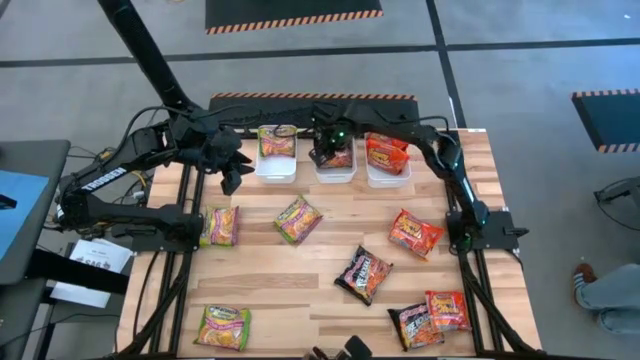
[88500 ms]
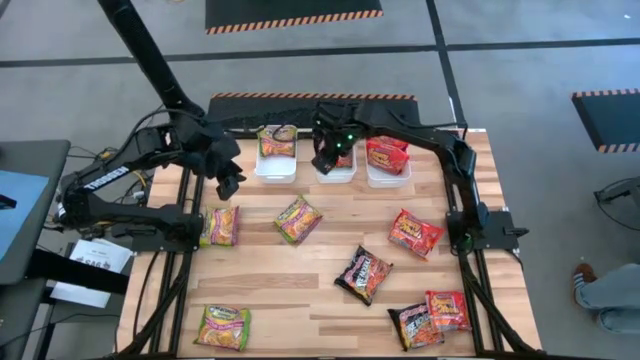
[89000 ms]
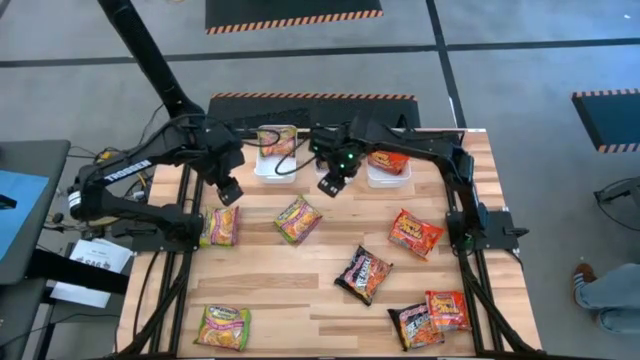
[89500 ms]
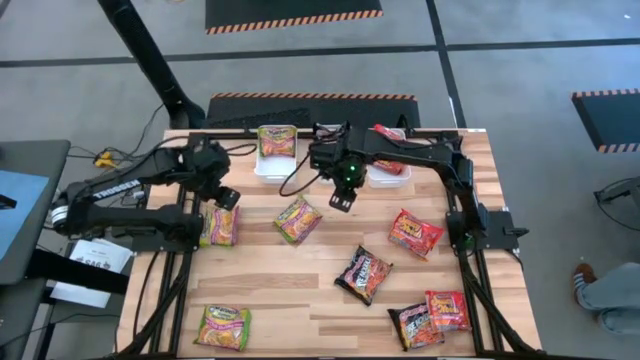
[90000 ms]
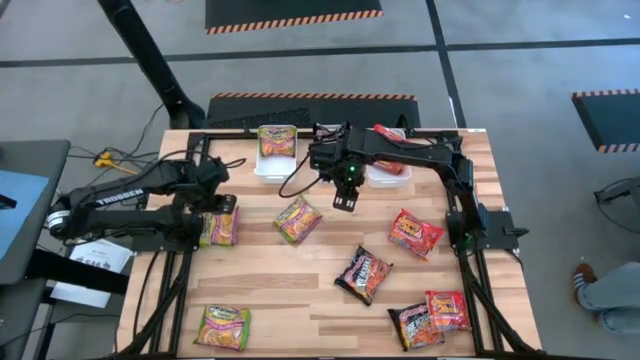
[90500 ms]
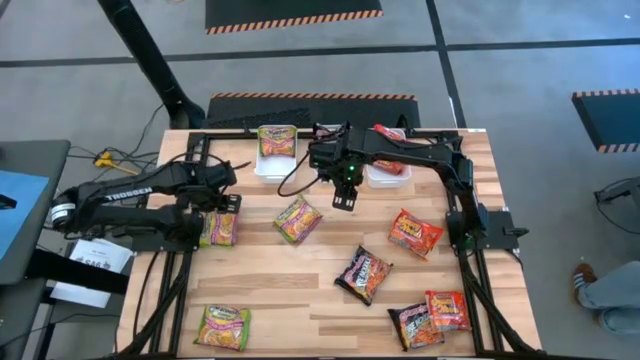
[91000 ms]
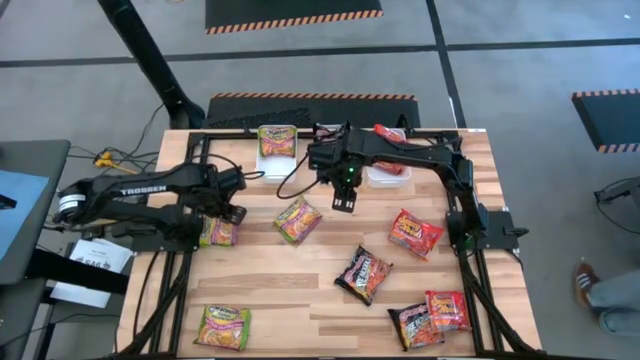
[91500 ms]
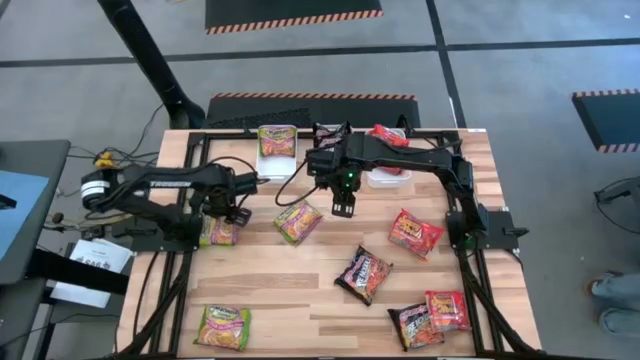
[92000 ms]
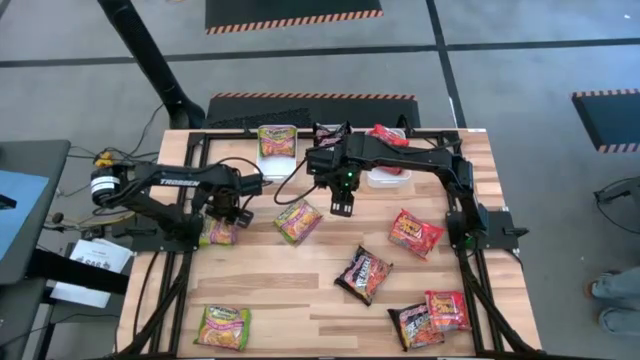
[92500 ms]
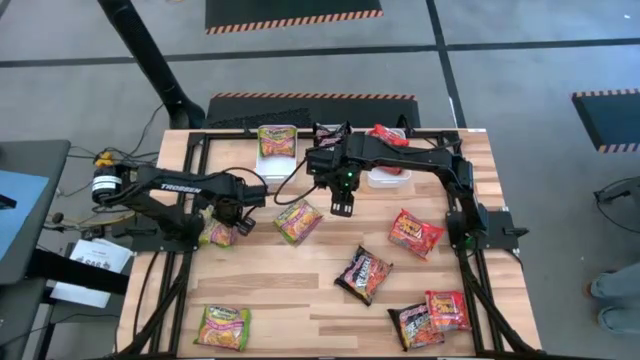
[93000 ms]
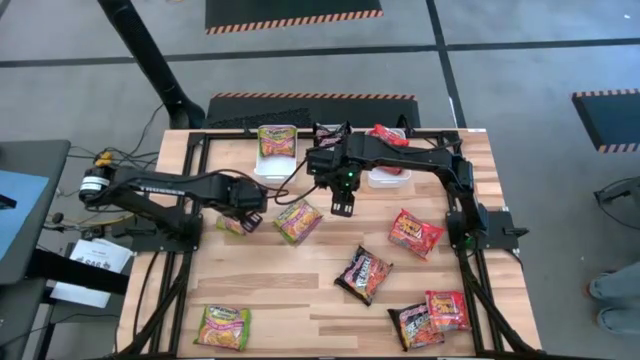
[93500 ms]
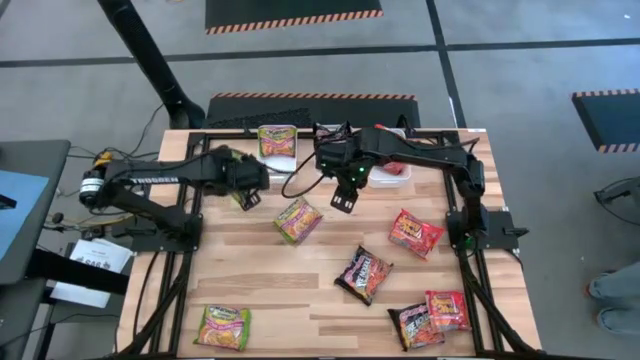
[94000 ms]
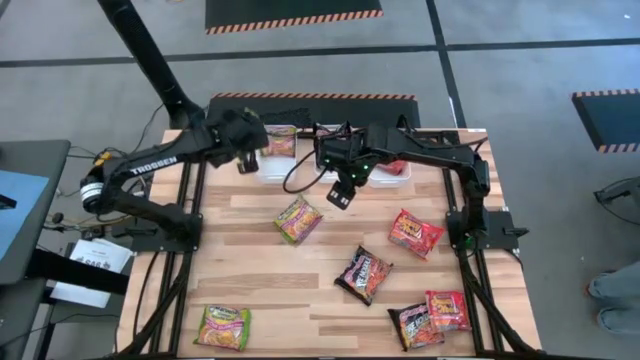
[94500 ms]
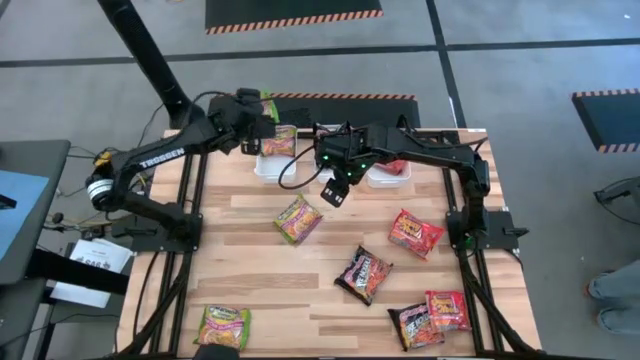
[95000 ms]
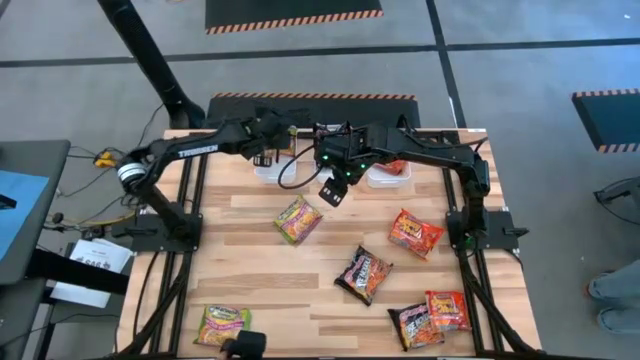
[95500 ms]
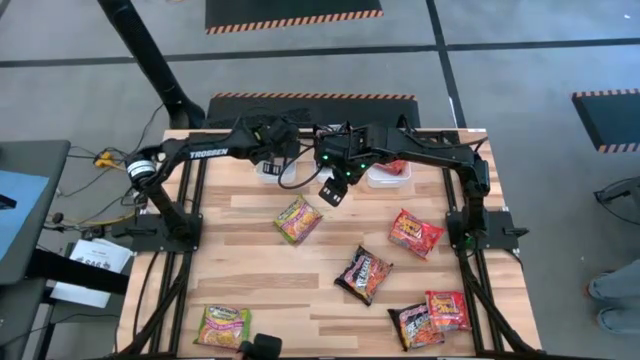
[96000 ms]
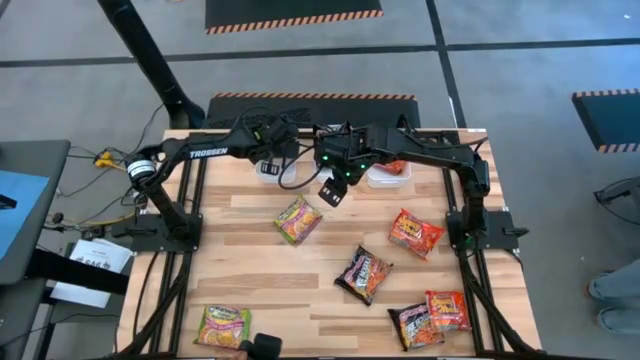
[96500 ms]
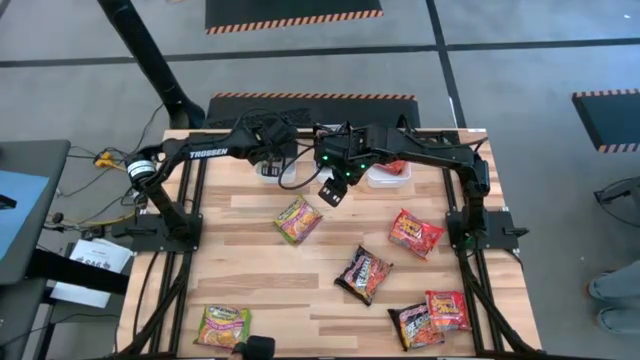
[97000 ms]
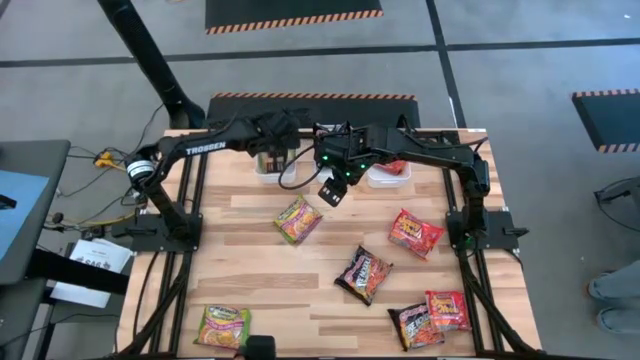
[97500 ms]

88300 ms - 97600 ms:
Task: Sort Maruchan noodles
Put the green noodle pack into the left white bin
